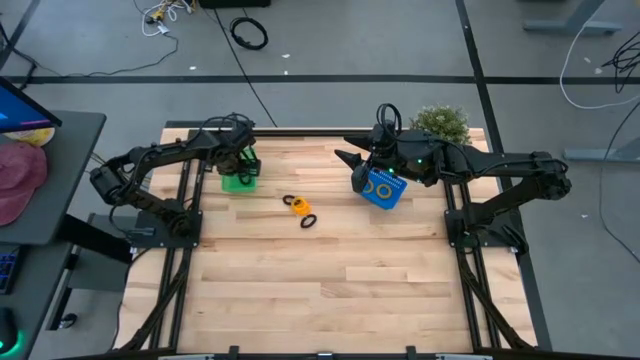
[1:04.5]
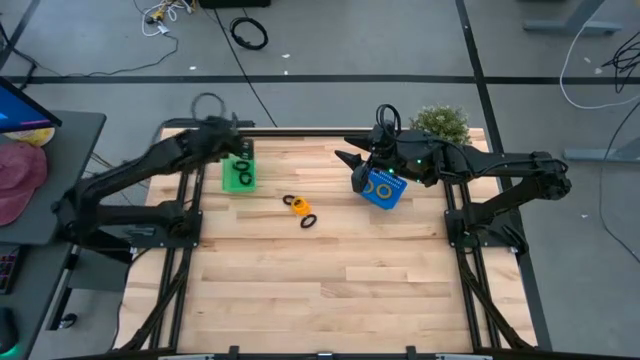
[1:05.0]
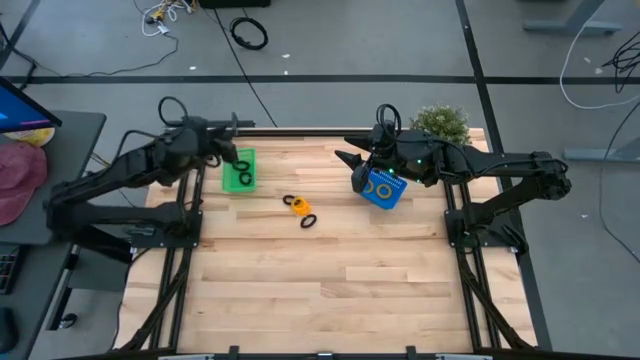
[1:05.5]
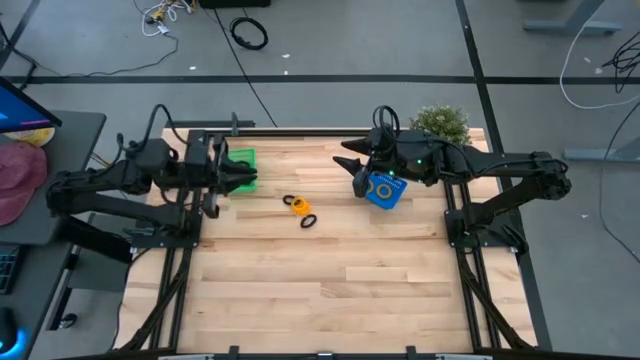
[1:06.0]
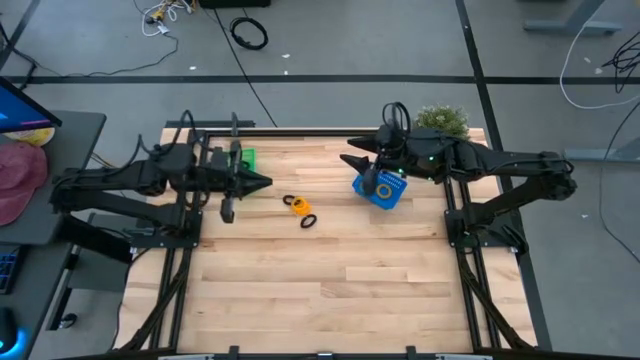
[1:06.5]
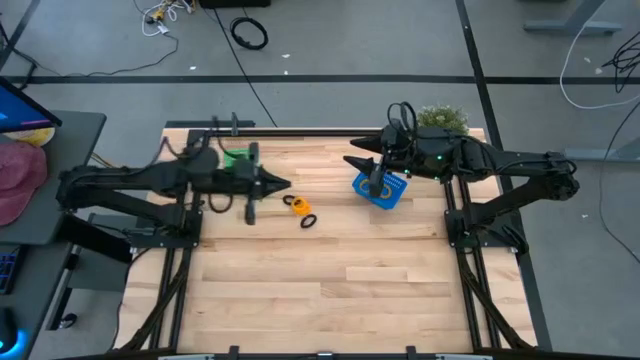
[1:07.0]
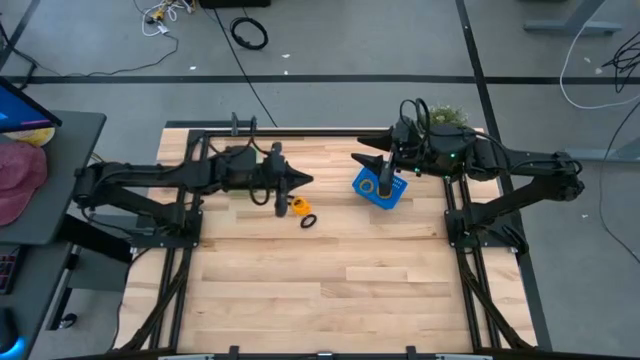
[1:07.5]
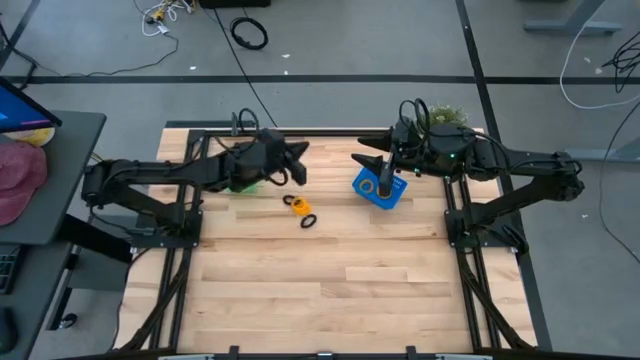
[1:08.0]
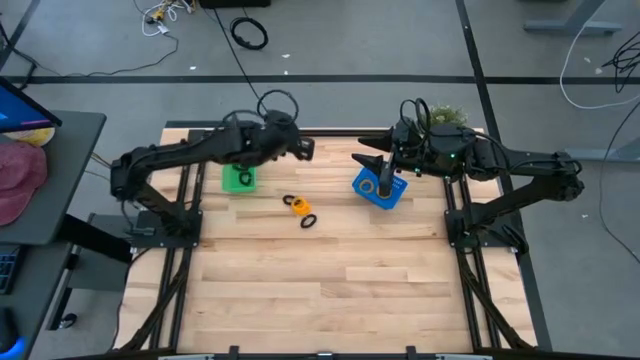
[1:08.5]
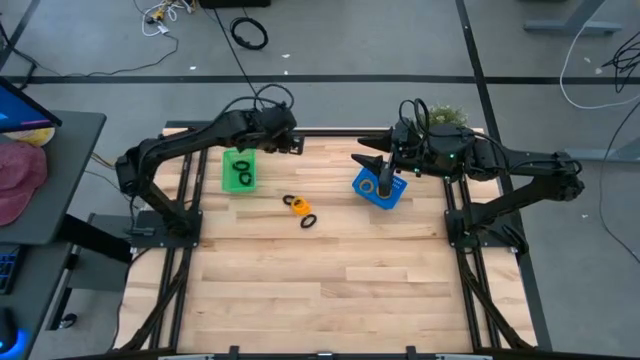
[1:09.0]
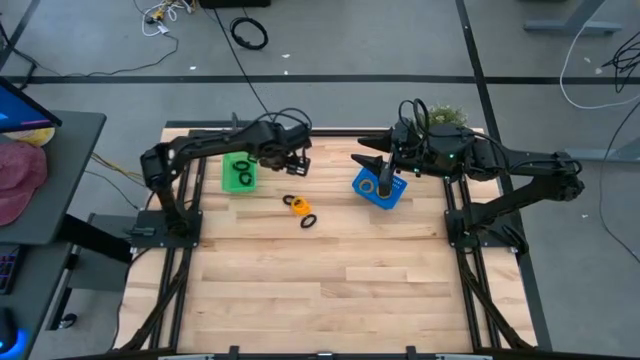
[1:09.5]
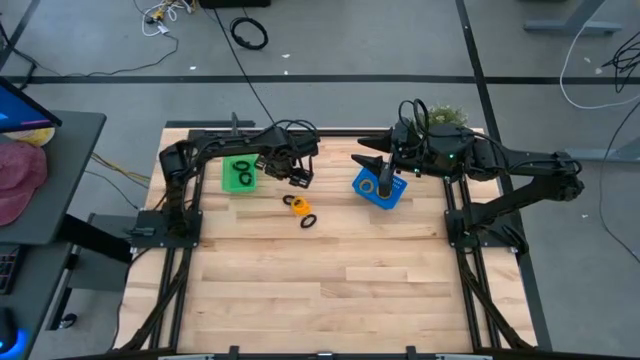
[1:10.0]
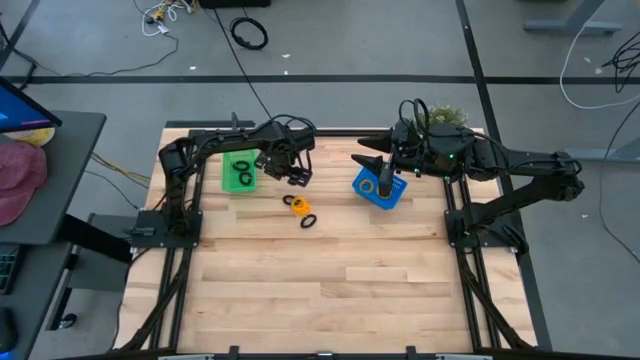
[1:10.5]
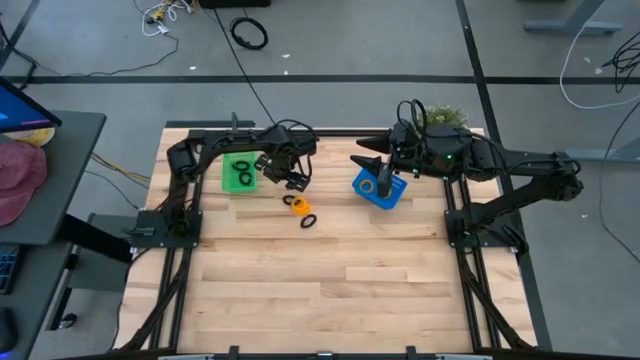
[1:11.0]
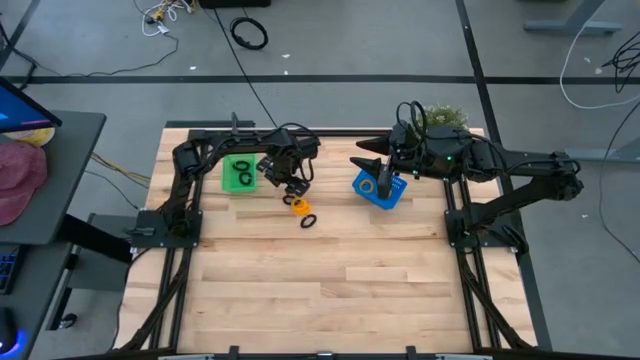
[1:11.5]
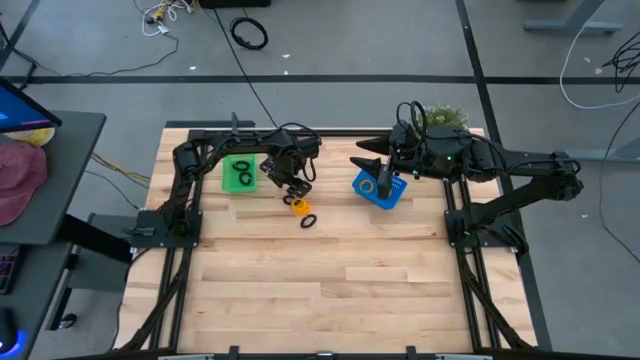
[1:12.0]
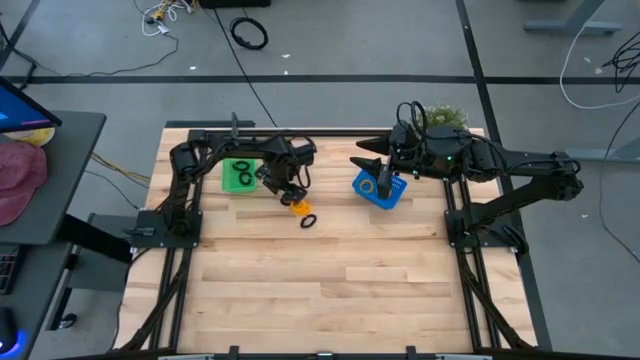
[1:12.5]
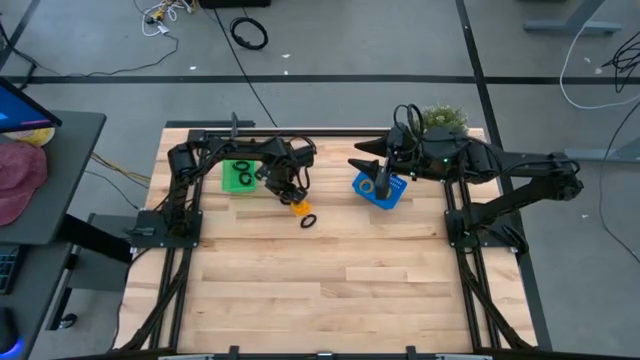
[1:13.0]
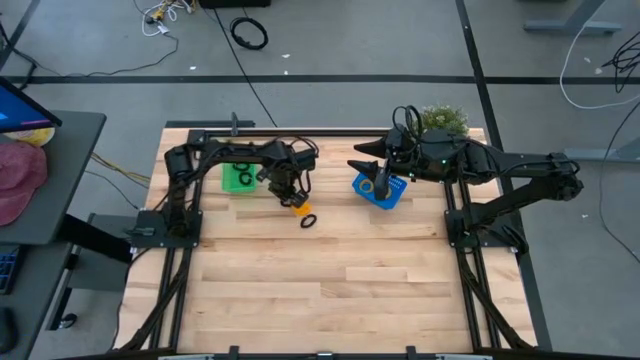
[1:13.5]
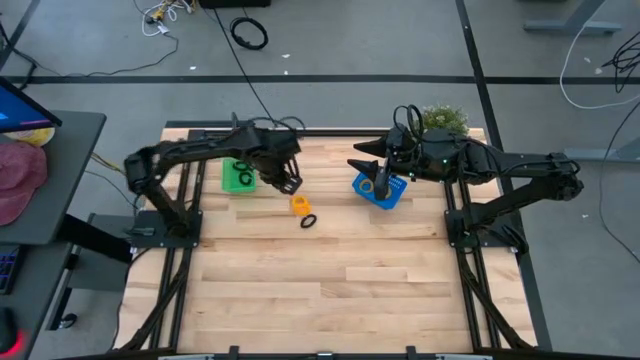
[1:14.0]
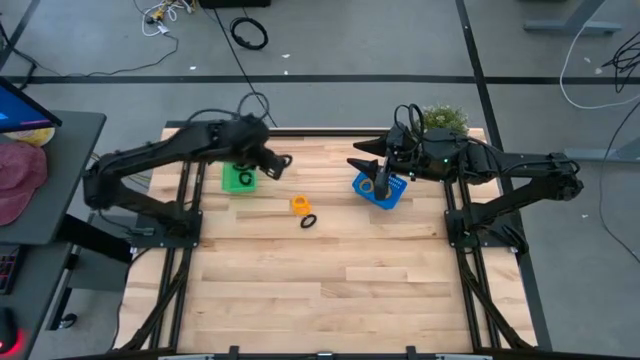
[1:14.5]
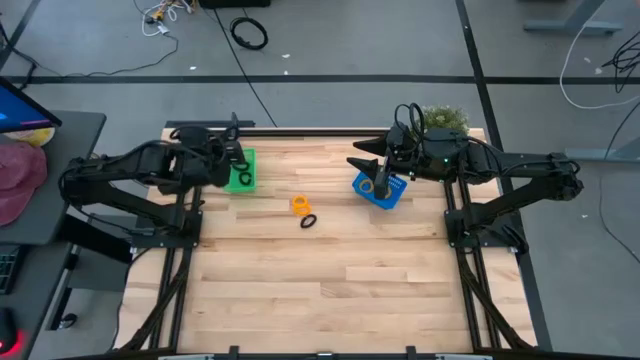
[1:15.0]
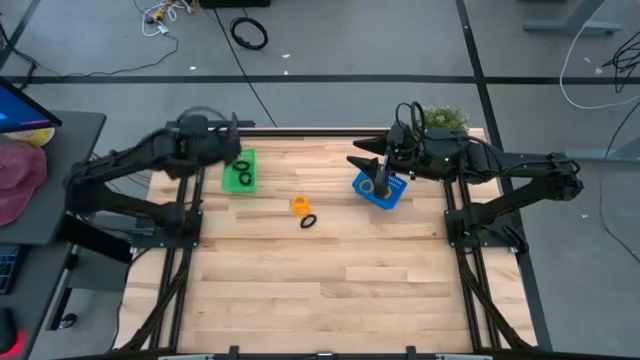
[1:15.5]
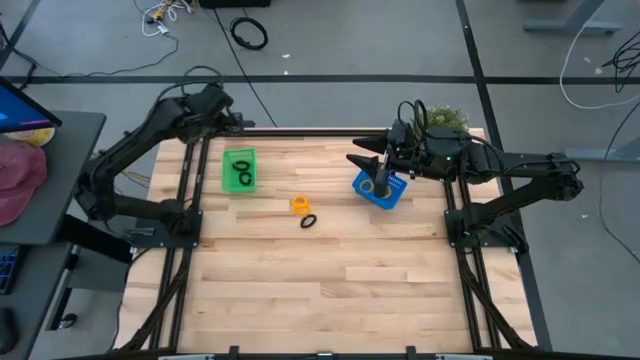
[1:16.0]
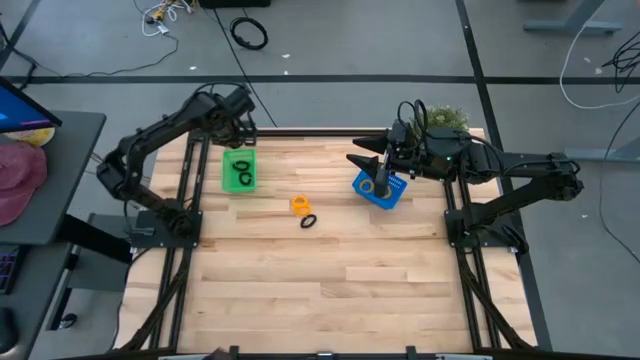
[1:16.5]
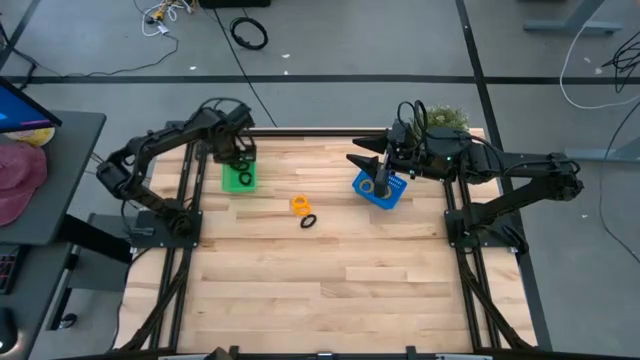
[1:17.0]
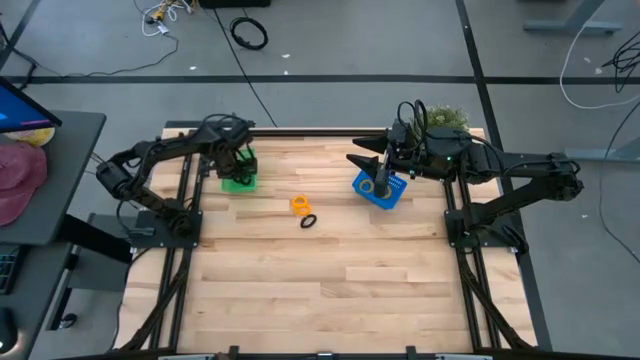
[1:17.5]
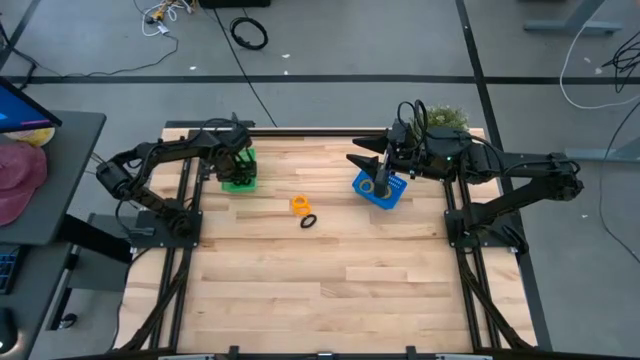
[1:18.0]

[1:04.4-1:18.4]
Task: Sort spring keychains
Put the black spring keychain into the green bin

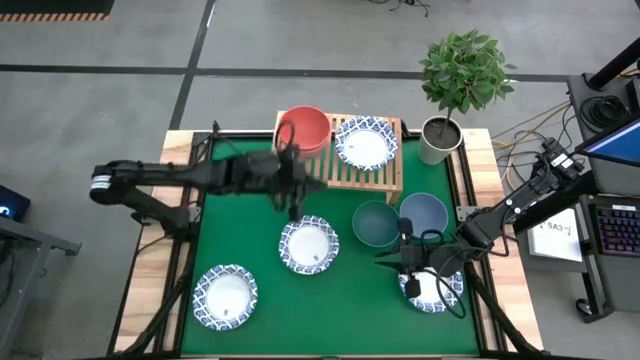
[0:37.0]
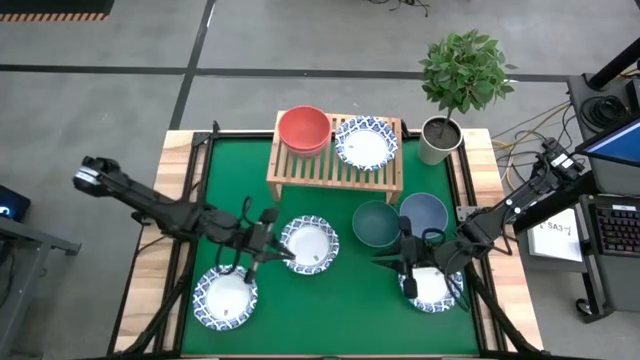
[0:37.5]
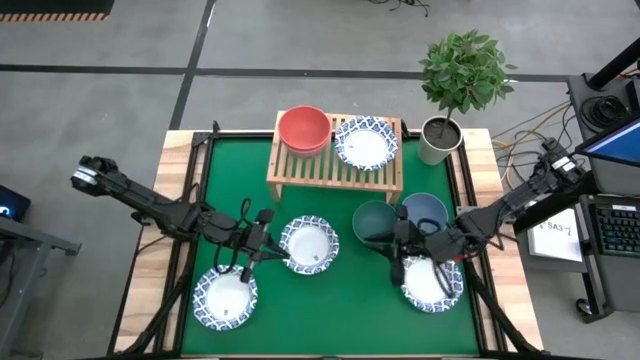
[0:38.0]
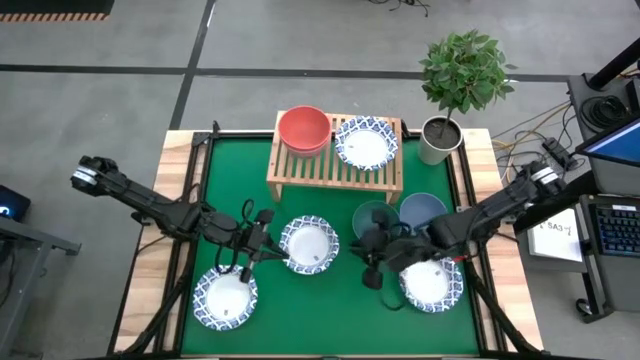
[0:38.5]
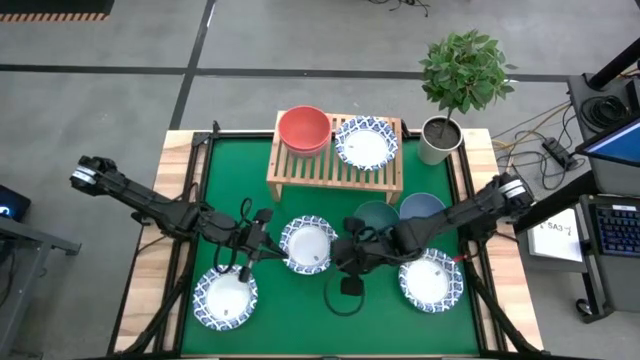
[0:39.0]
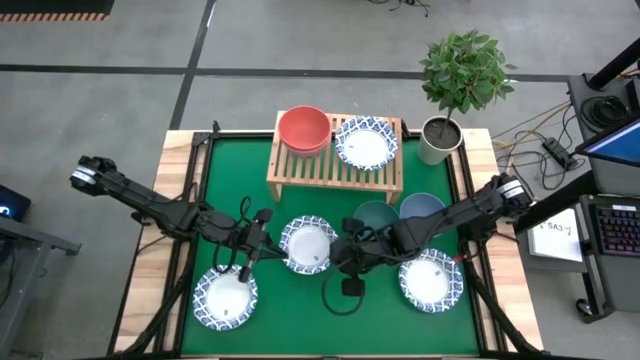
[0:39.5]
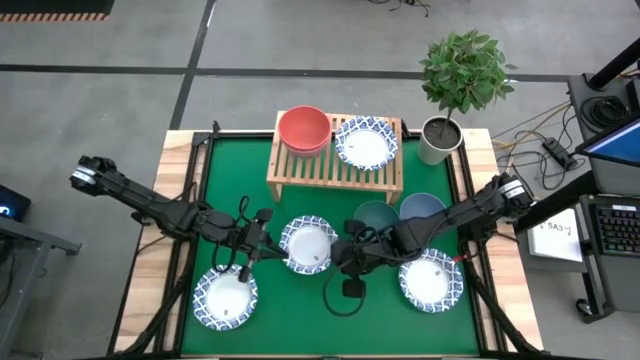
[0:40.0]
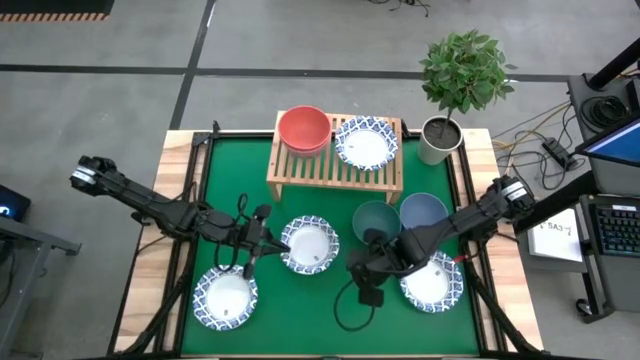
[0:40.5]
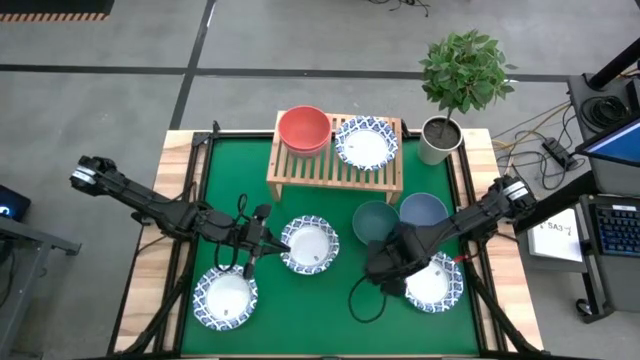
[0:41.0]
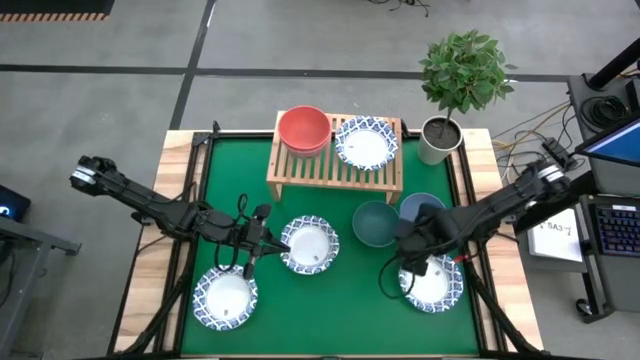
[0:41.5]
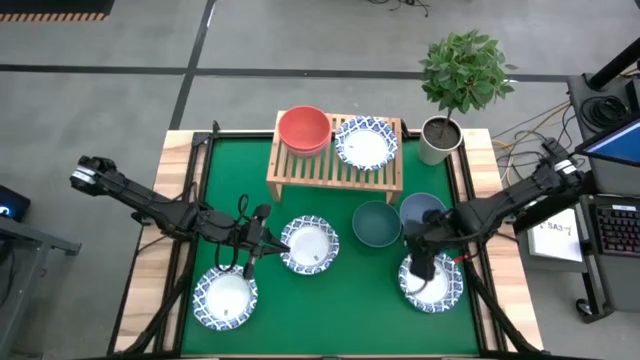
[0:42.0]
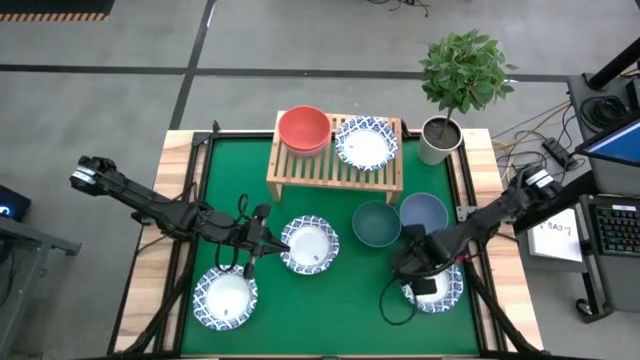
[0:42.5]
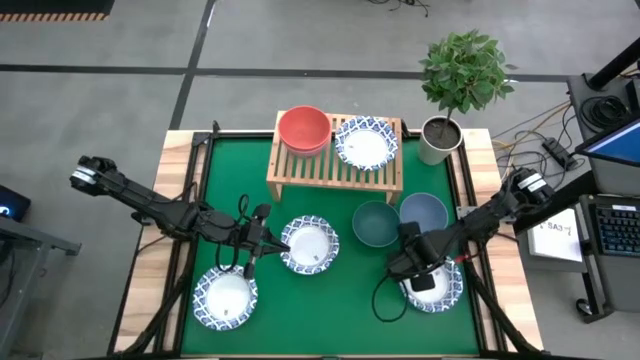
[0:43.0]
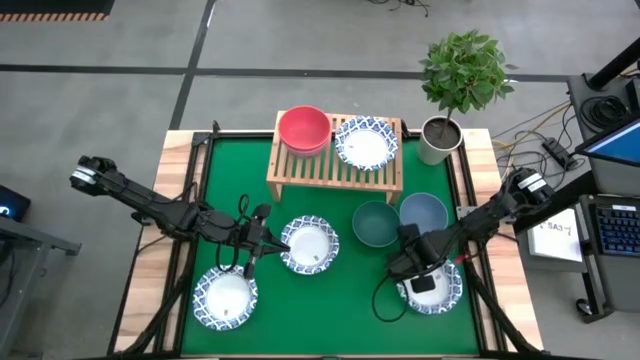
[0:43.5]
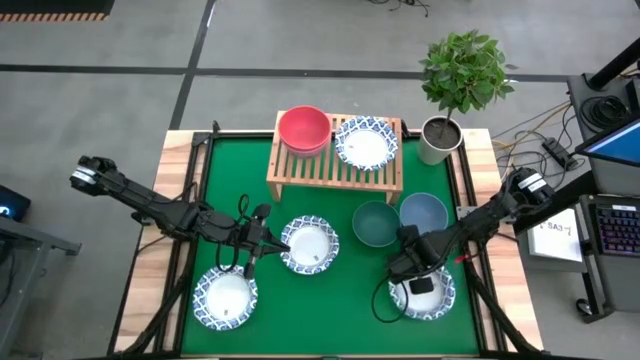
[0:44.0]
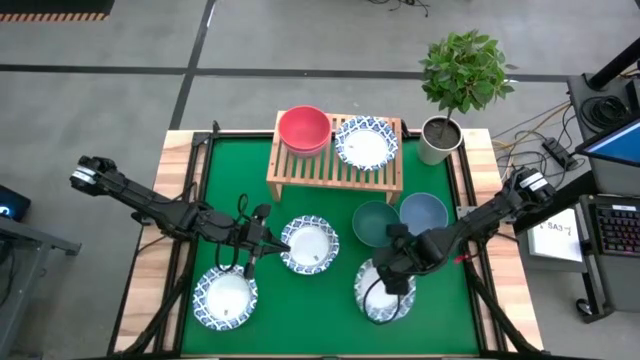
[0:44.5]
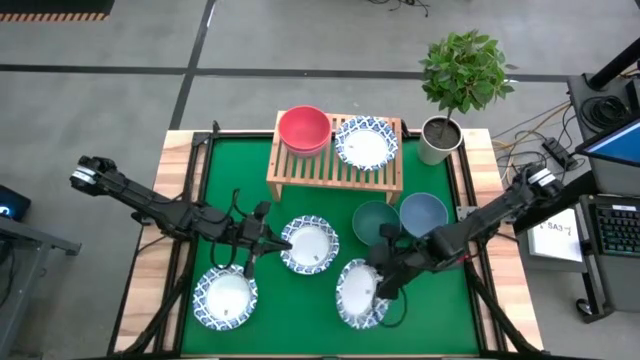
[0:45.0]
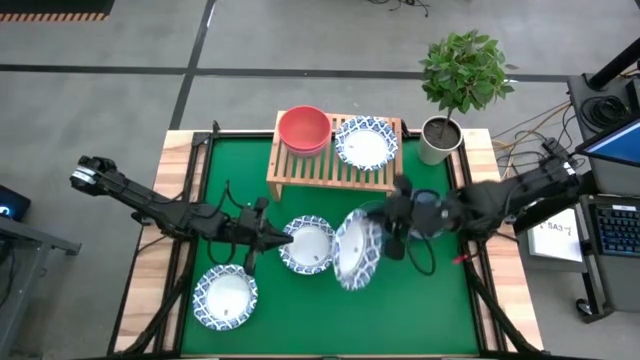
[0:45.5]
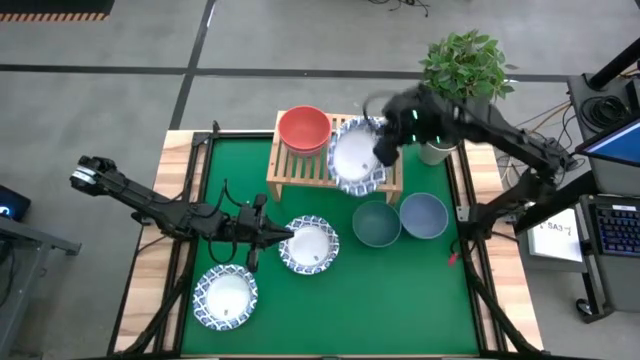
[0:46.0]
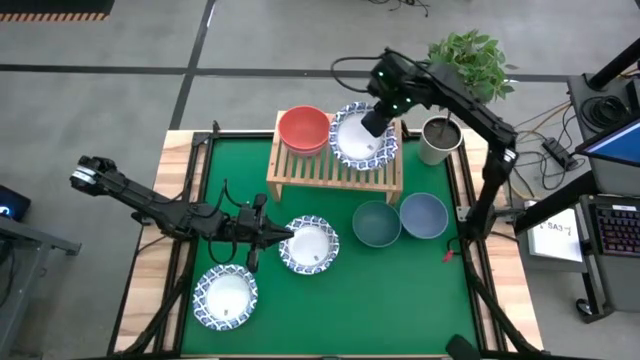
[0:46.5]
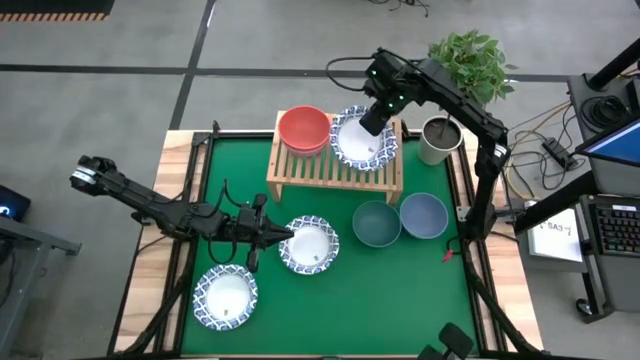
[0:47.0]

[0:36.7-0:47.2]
Task: Place and stack bowls onto a shelf
Stack the white bowl on top of the white bowl on the shelf
